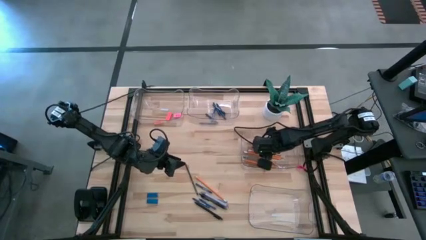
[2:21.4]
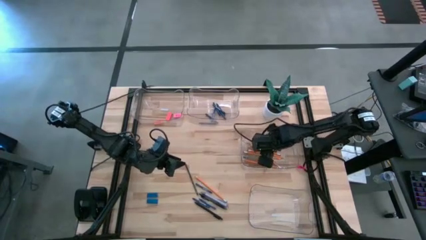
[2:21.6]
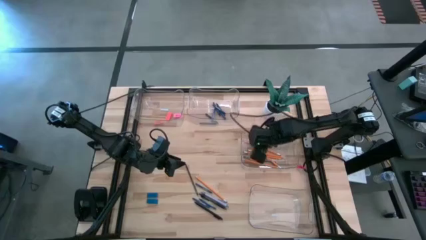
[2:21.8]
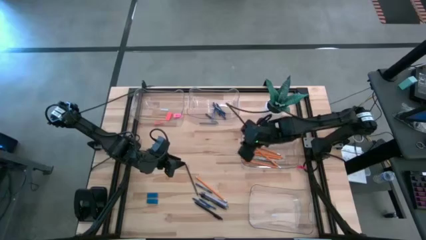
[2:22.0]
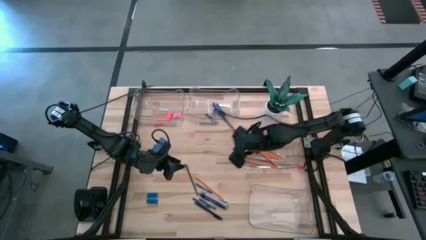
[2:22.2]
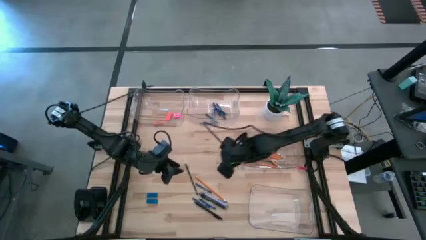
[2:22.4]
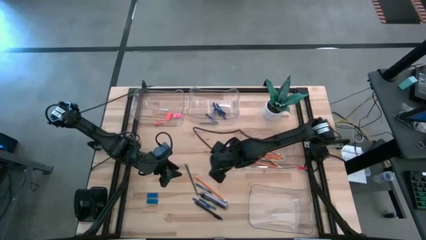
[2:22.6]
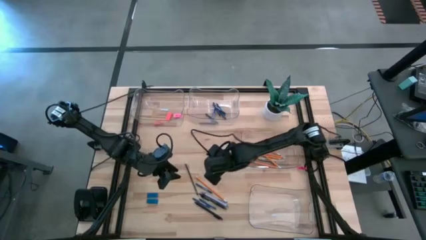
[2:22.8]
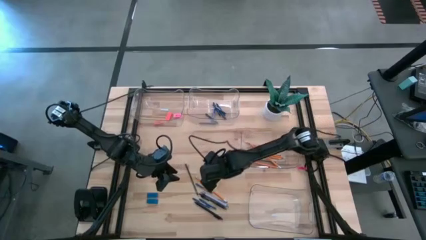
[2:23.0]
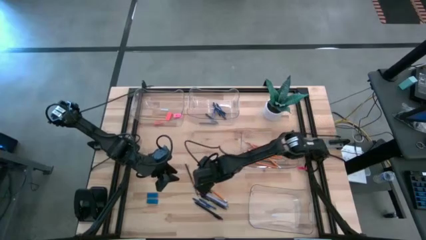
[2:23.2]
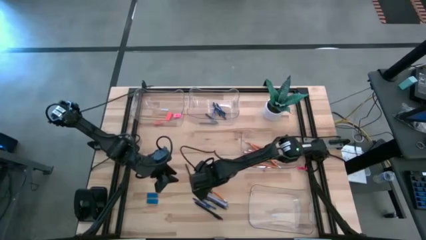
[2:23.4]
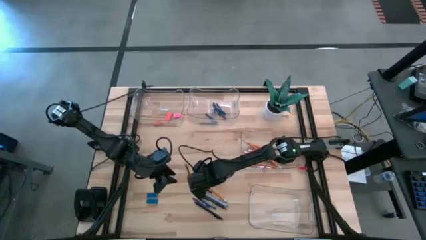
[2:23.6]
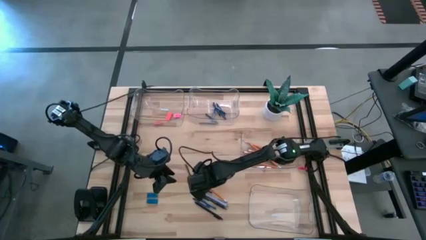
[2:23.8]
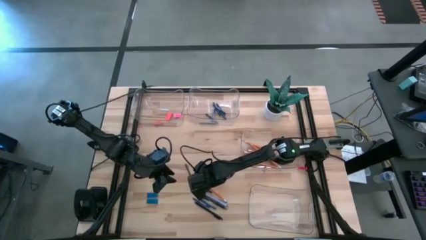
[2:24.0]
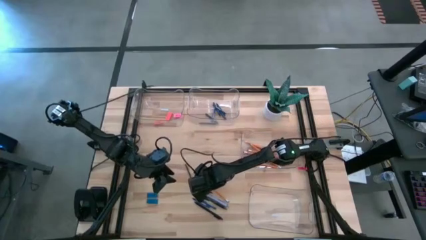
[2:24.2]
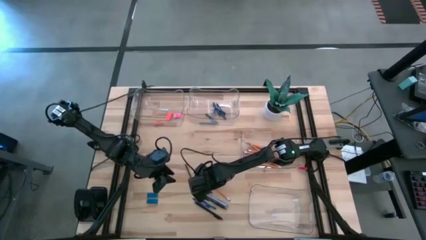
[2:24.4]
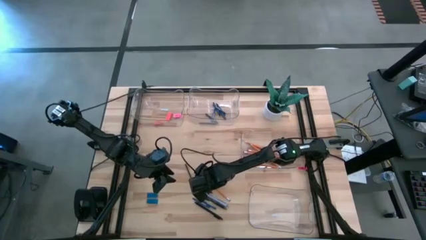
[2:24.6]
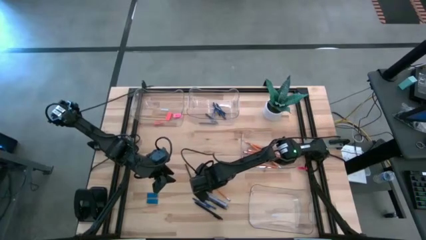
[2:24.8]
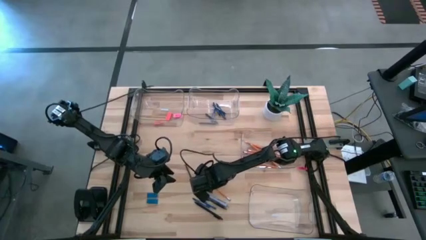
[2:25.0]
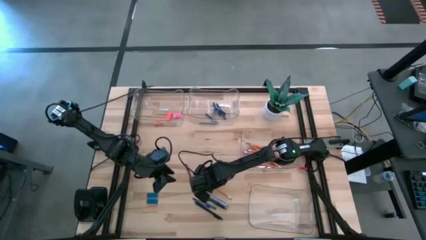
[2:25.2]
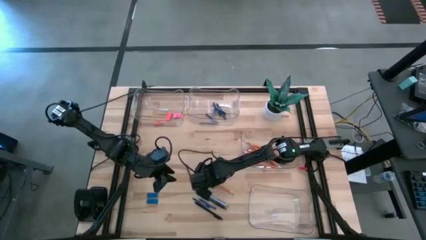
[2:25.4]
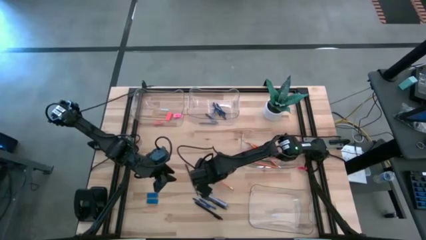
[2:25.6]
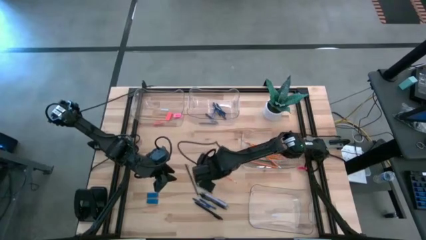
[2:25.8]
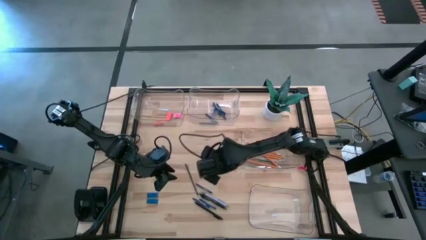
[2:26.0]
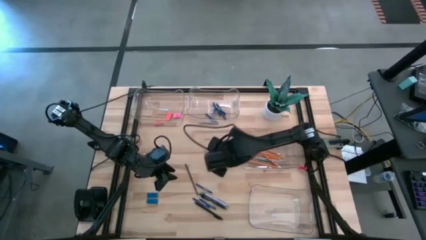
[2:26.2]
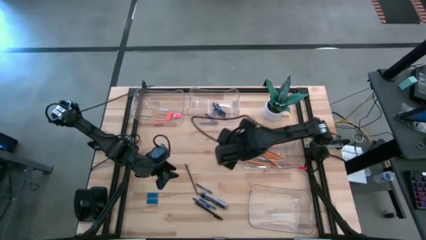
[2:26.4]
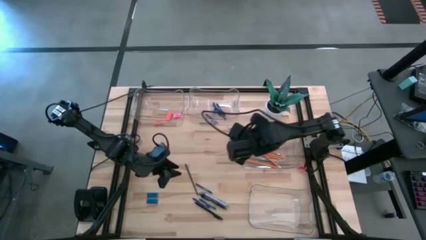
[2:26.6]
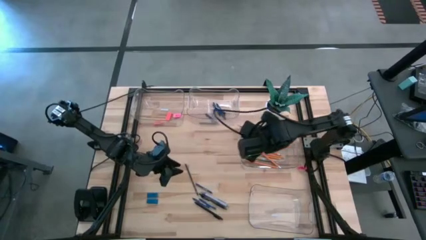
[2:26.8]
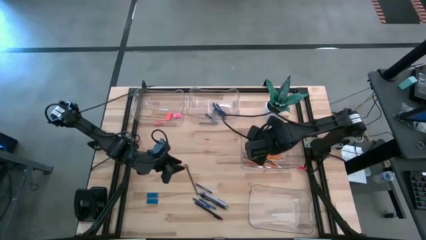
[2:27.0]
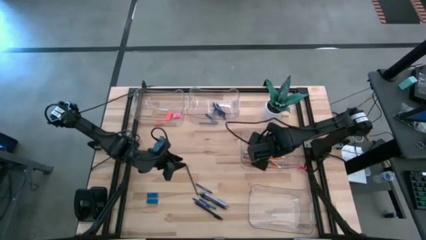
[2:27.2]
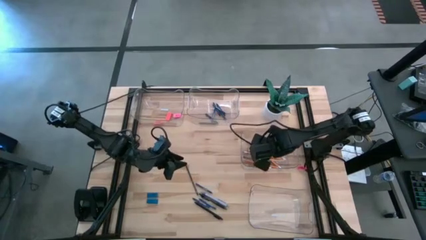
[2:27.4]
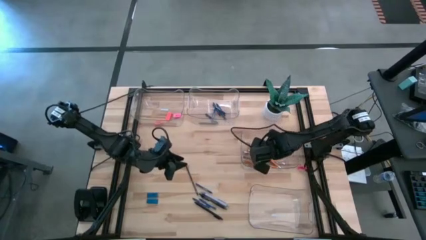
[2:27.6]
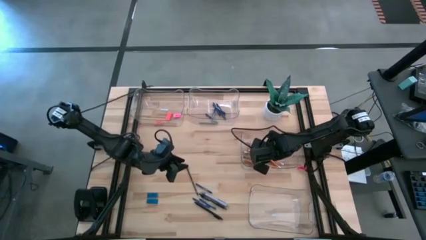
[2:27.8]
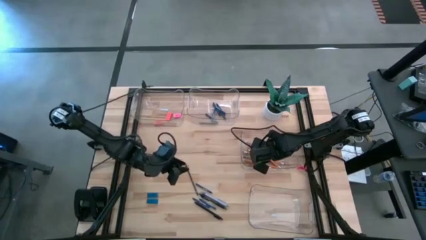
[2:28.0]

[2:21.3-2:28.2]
Task: Sort crayons/erasers/pens/pencils in bins
Put the orange pencil into the middle transparent bin

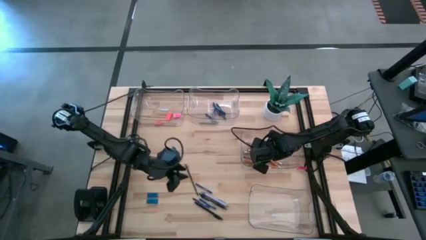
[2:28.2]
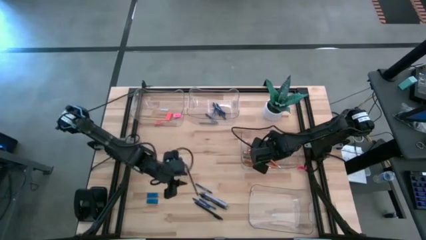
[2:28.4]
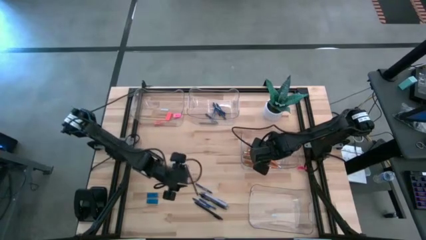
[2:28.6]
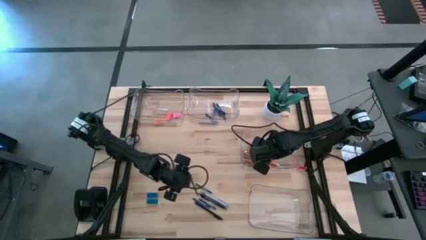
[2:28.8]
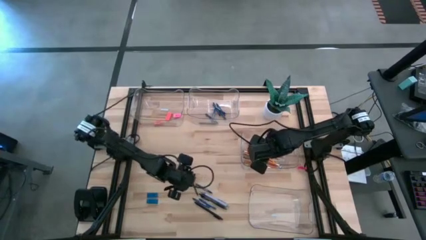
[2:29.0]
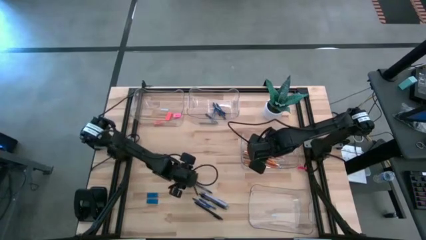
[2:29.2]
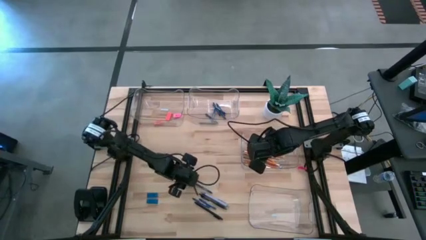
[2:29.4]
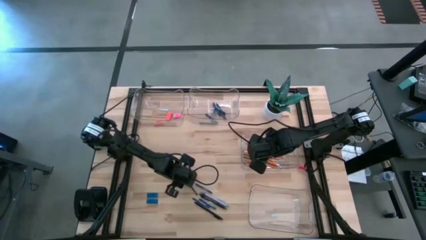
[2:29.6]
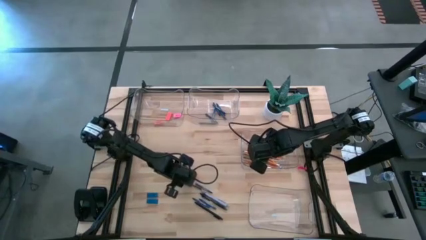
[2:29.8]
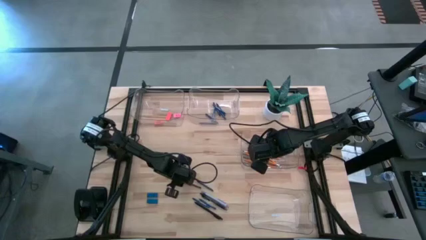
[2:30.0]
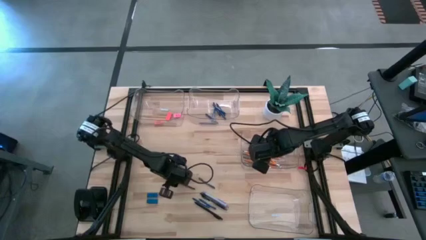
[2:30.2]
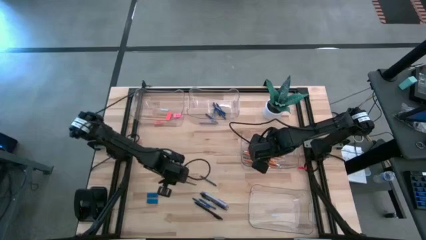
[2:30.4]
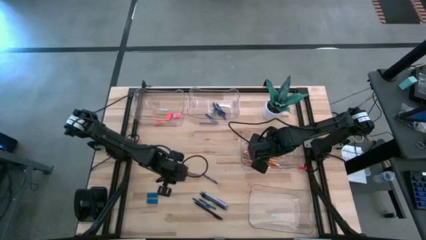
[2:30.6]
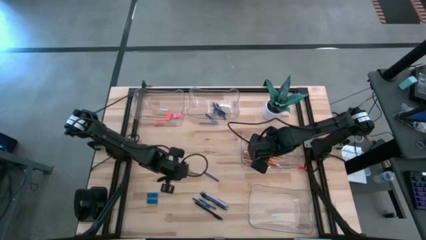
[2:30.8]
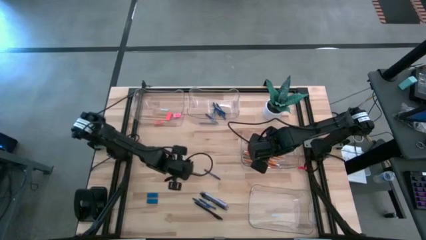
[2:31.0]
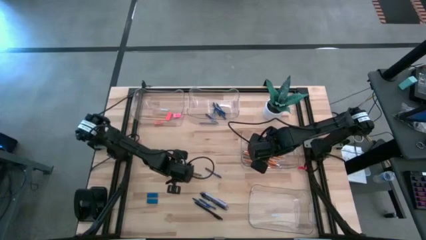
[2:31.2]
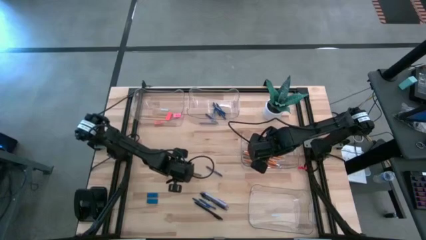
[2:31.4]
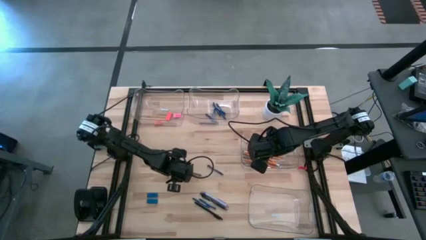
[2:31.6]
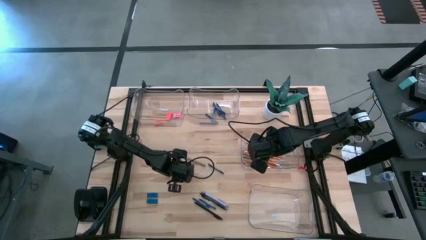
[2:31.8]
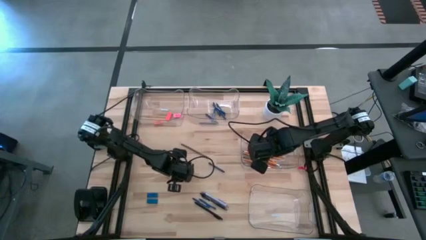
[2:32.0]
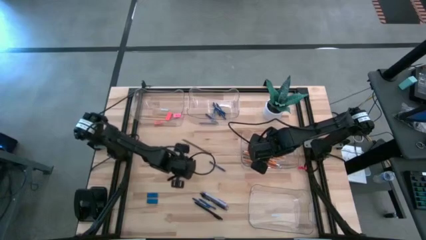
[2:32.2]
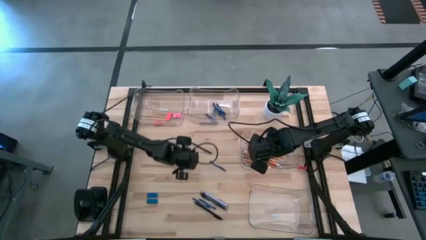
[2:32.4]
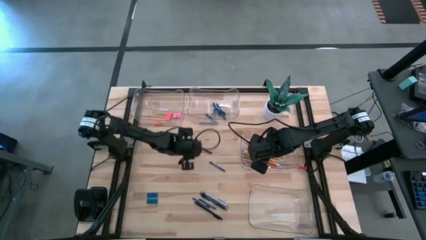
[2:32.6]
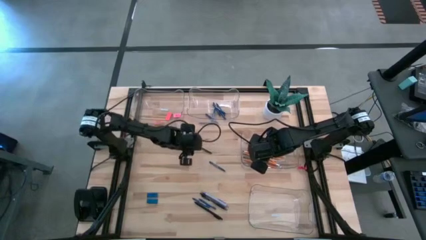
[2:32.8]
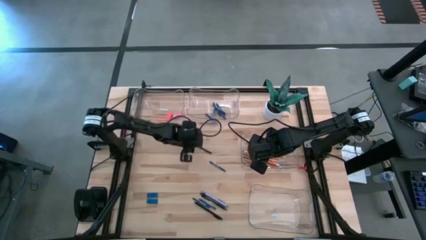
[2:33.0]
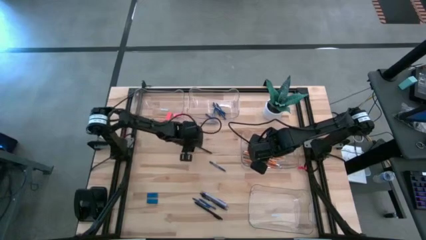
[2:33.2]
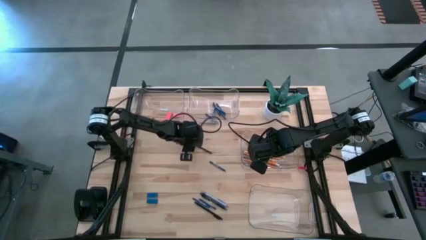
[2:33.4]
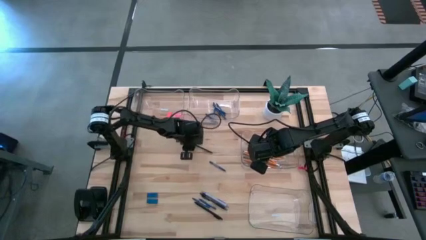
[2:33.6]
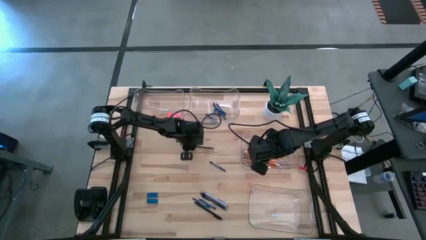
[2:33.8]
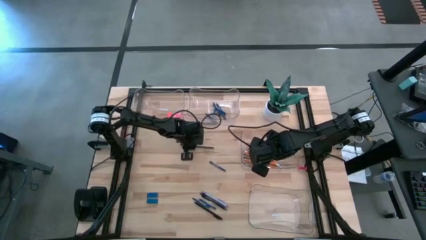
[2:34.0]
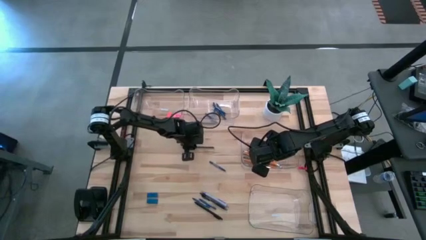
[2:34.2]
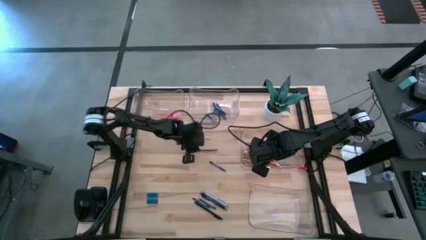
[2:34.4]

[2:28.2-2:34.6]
Put the black pencil into the middle transparent bin
